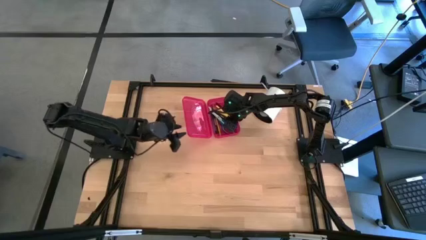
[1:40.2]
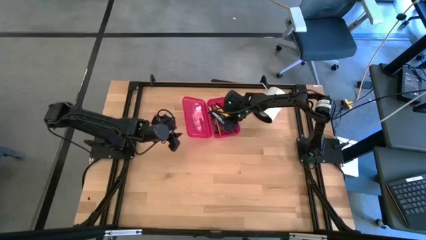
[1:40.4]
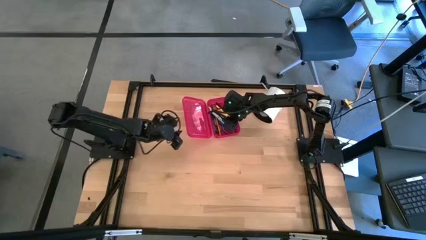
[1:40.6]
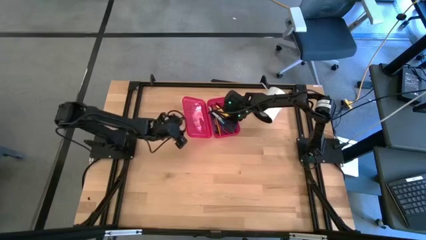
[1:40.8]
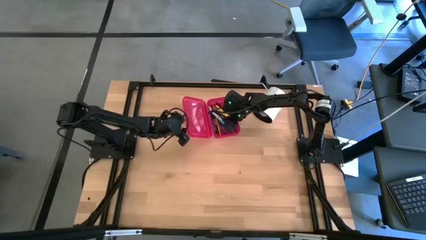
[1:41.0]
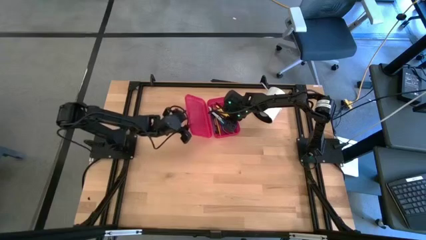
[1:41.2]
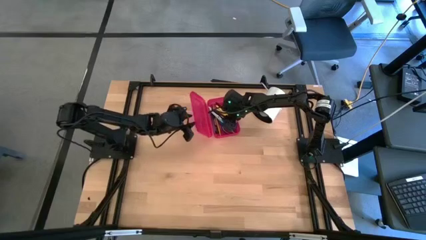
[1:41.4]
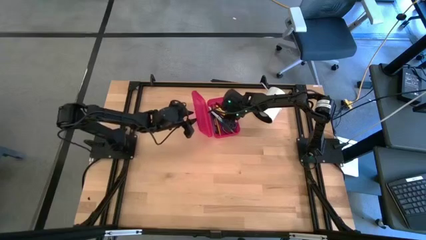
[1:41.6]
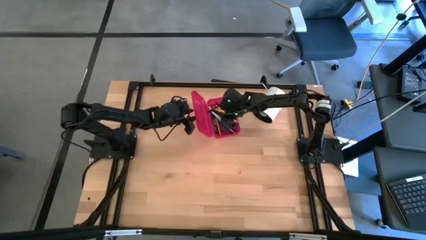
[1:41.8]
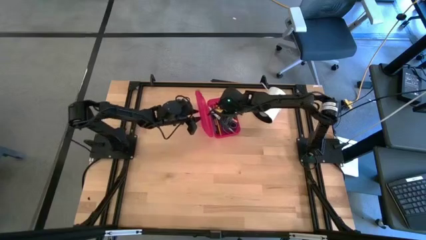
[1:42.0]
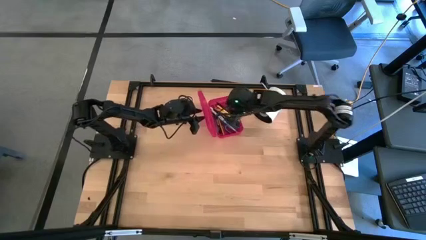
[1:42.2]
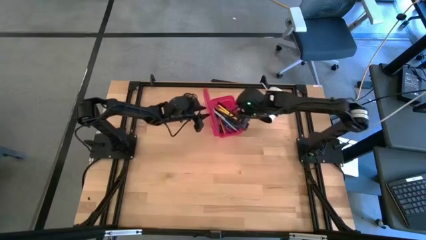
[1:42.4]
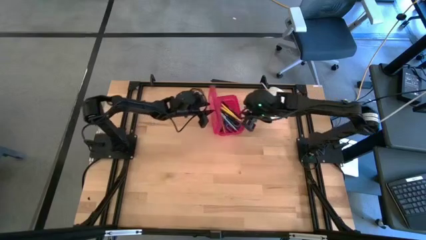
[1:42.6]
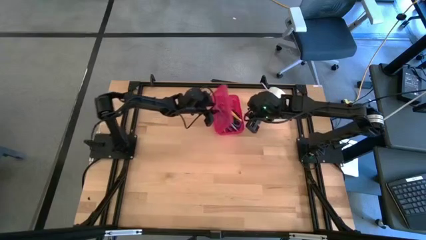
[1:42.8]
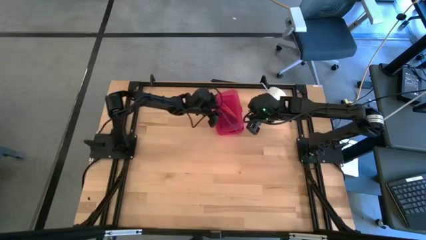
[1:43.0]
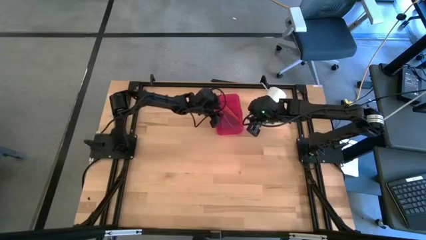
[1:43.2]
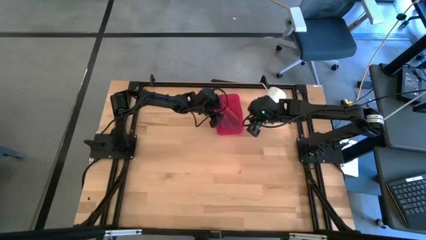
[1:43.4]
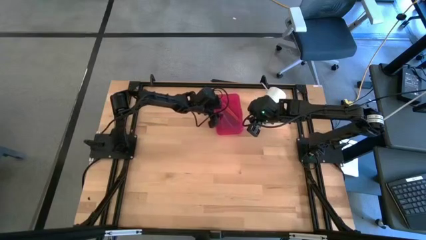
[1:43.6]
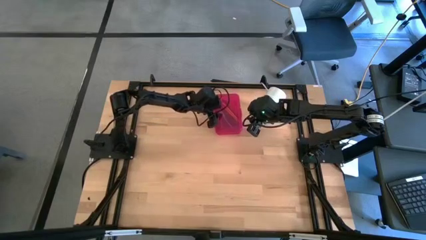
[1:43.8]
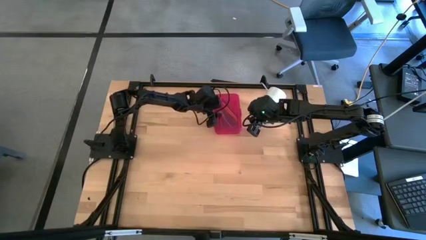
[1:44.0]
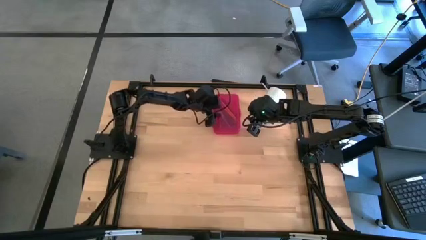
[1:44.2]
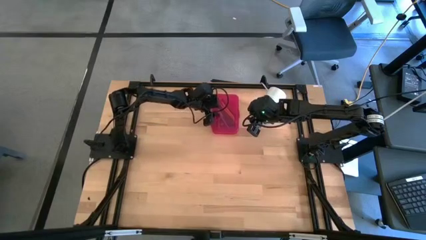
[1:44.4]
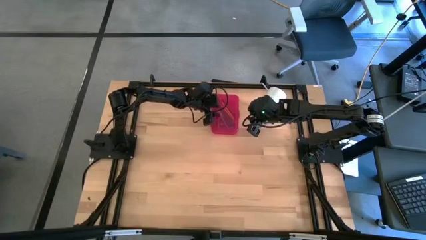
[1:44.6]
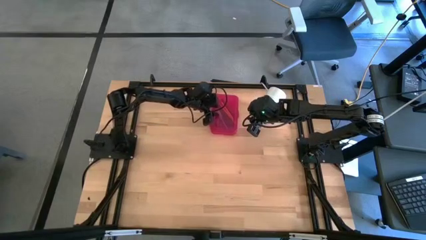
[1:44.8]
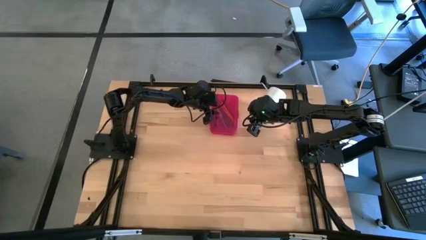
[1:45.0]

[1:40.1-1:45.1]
Task: Pick & place school supplies into a supply box
Close the red supply box

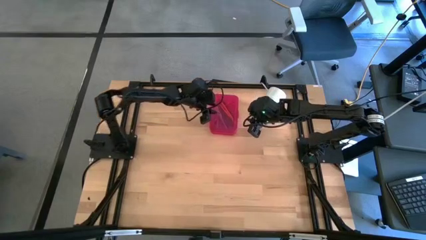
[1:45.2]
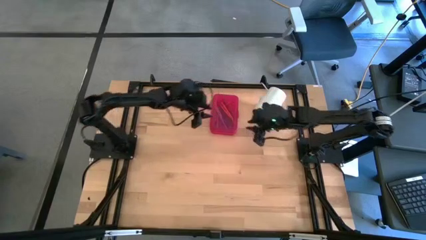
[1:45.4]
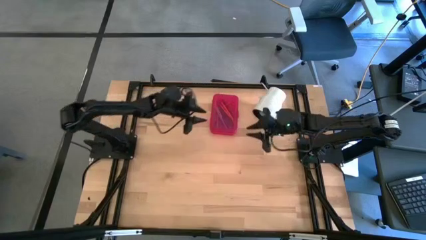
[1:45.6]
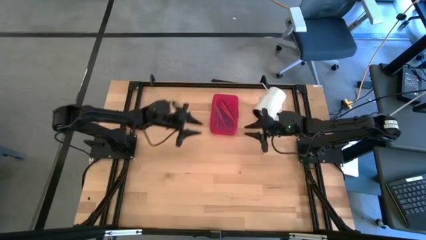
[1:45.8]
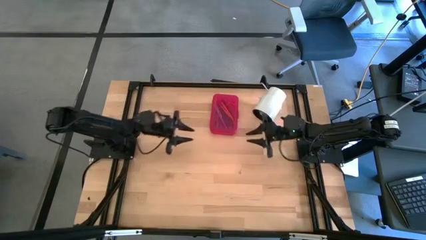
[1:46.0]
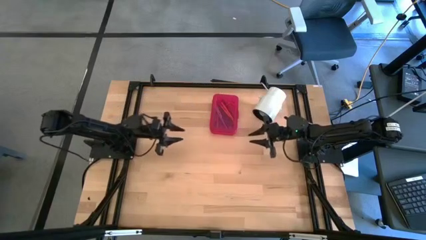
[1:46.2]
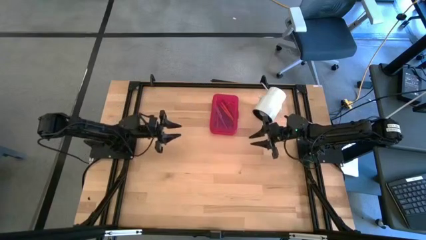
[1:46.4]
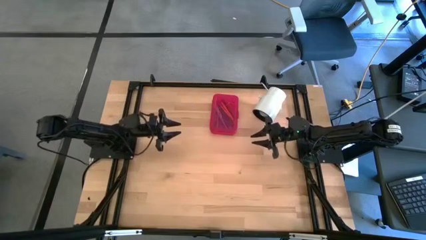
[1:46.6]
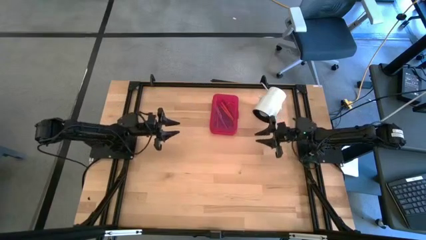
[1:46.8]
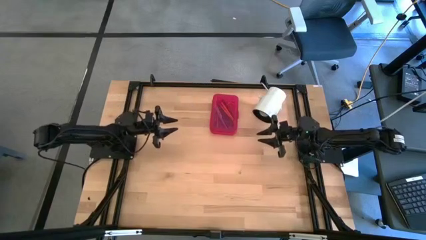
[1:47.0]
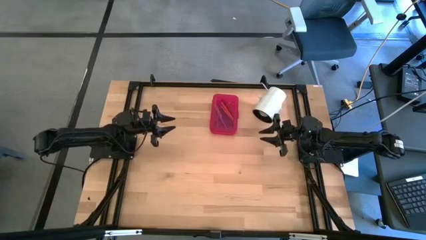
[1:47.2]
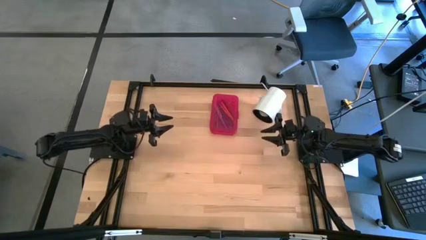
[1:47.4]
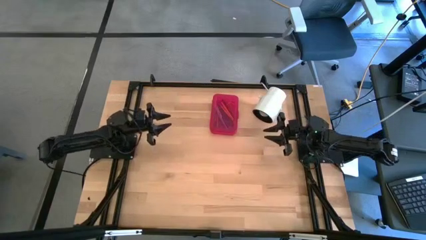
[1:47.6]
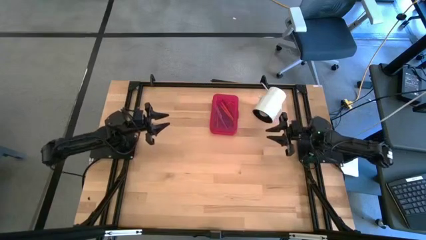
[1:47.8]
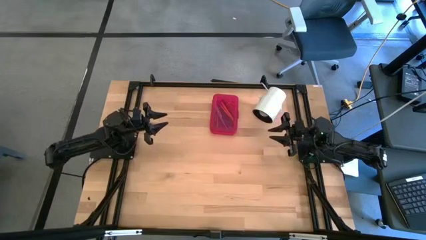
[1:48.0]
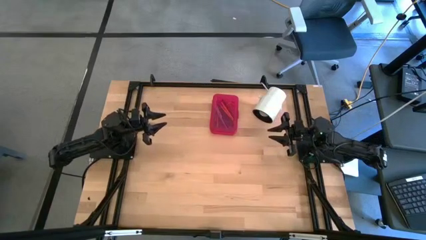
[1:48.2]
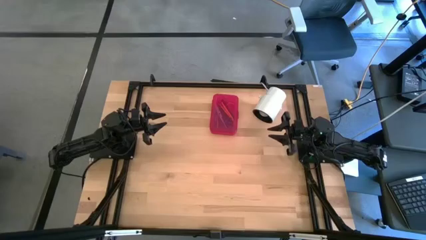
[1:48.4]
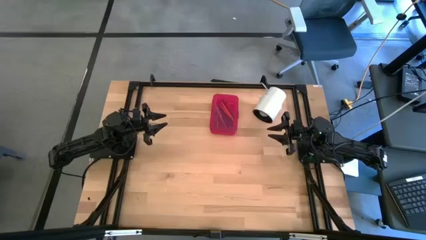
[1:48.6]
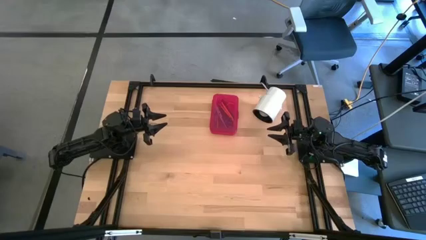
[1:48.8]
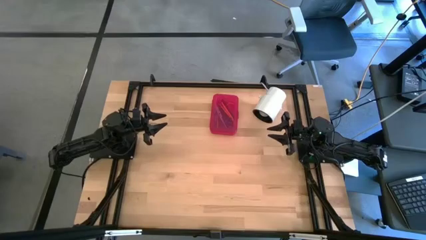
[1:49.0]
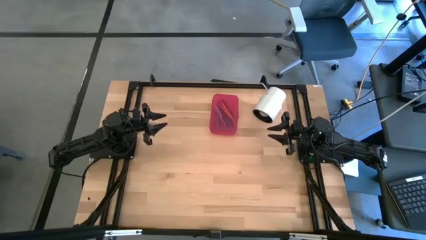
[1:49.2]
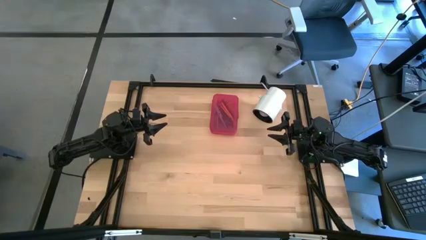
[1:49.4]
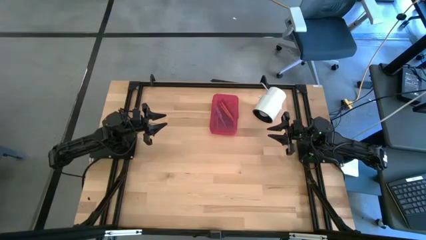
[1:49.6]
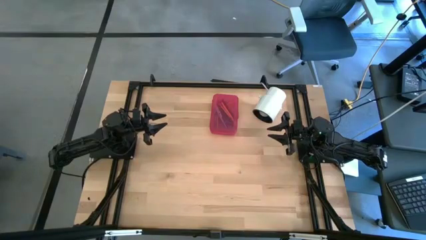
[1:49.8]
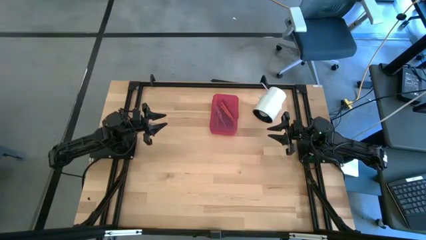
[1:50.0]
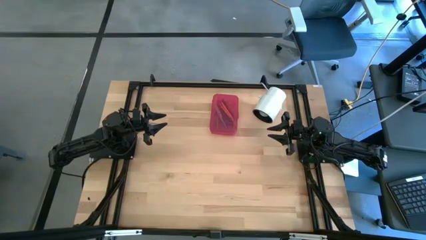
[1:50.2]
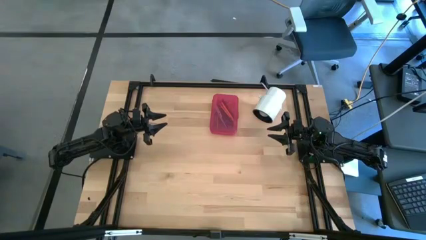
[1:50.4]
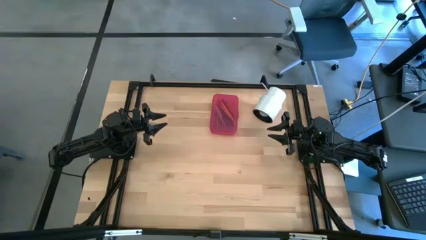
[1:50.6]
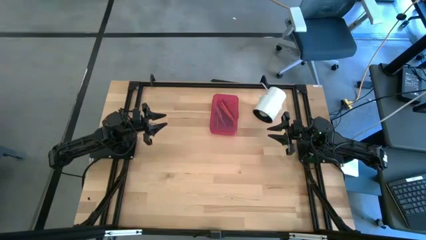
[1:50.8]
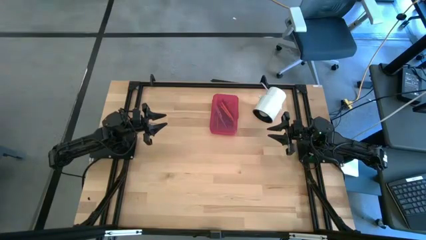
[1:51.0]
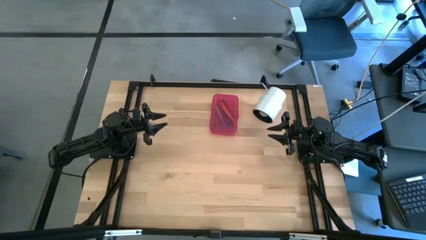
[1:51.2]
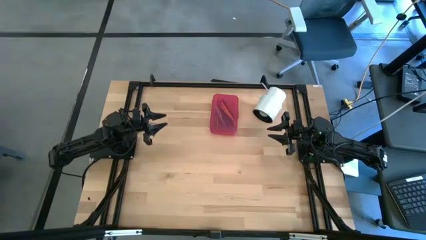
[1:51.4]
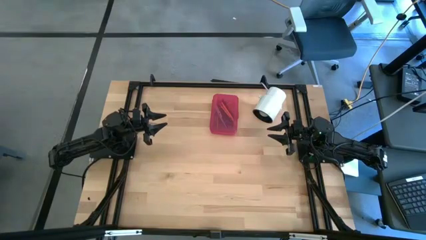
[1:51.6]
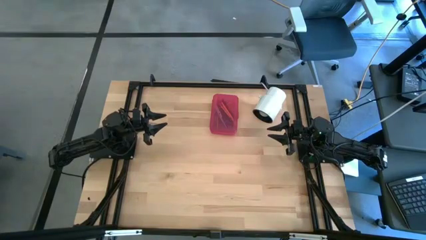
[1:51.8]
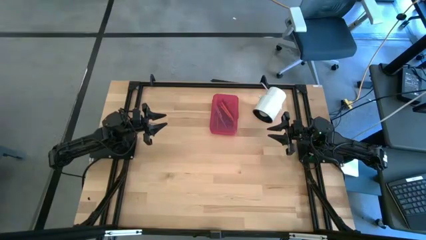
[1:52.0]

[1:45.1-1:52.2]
Return to Home Position

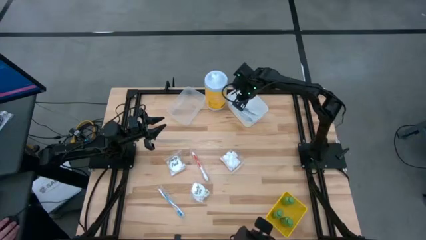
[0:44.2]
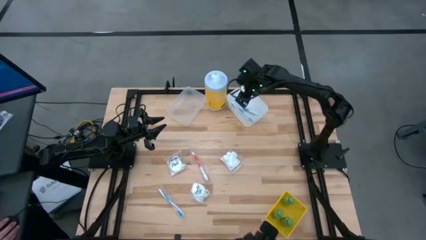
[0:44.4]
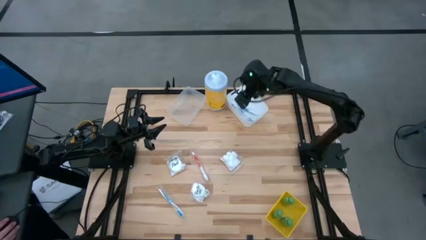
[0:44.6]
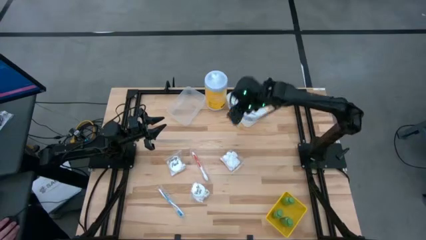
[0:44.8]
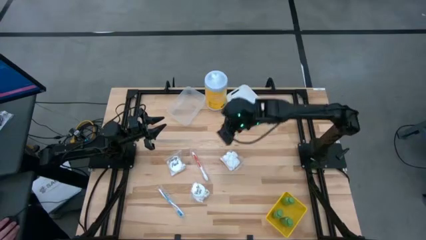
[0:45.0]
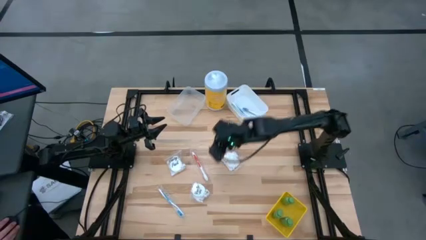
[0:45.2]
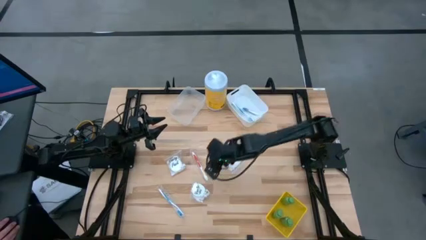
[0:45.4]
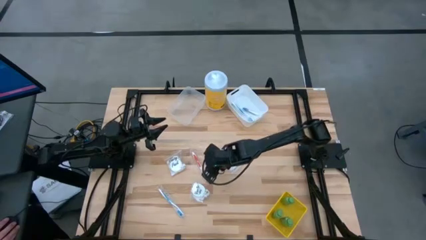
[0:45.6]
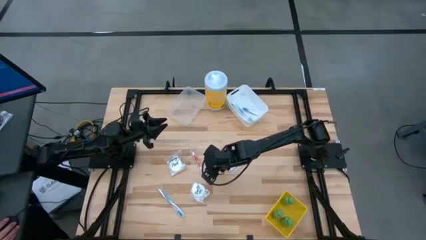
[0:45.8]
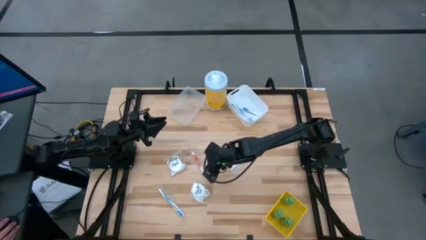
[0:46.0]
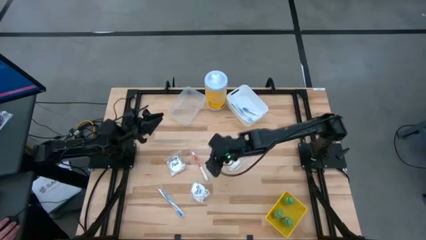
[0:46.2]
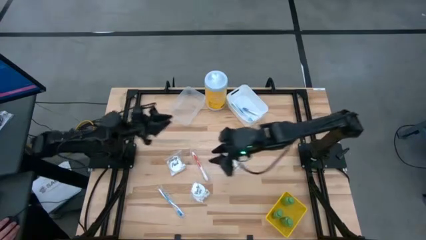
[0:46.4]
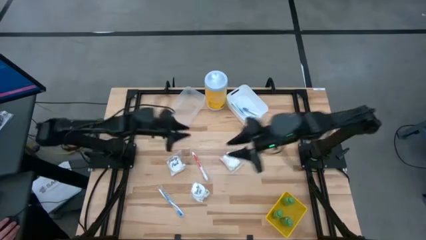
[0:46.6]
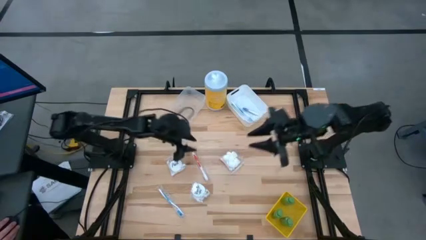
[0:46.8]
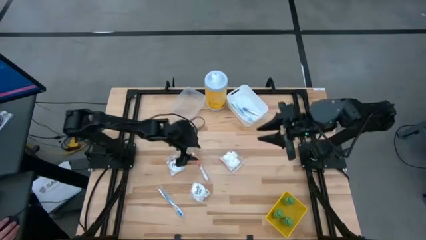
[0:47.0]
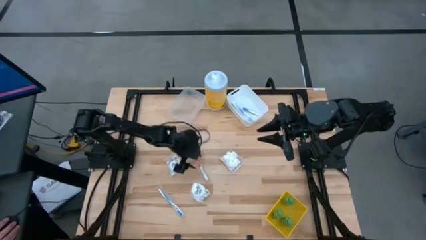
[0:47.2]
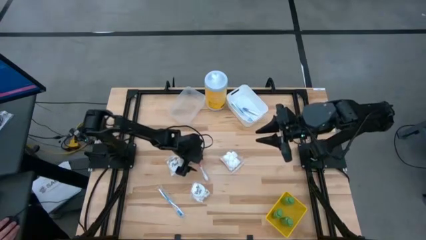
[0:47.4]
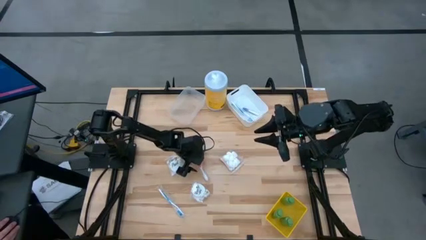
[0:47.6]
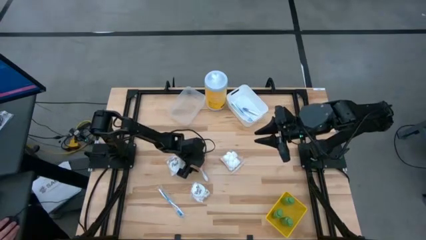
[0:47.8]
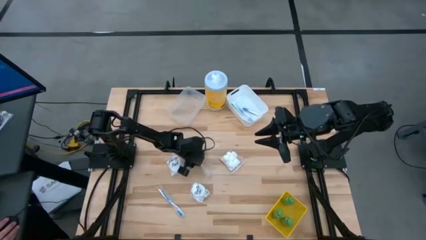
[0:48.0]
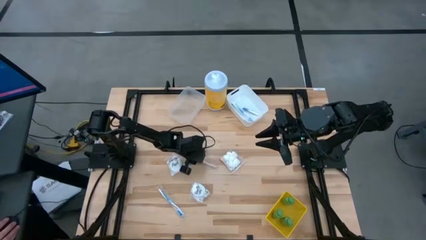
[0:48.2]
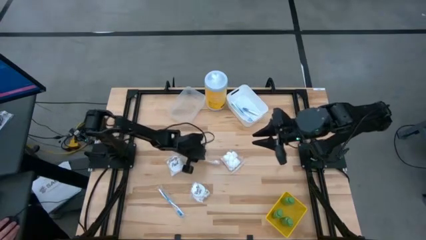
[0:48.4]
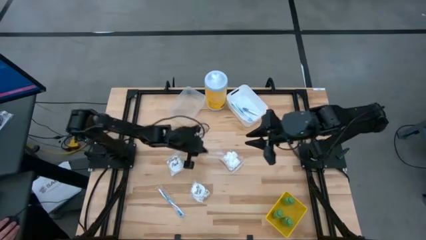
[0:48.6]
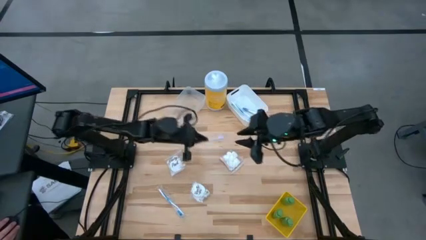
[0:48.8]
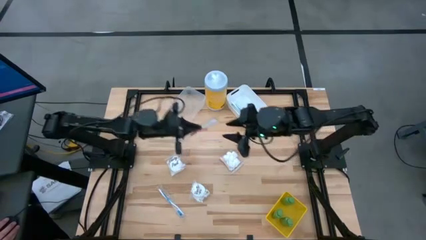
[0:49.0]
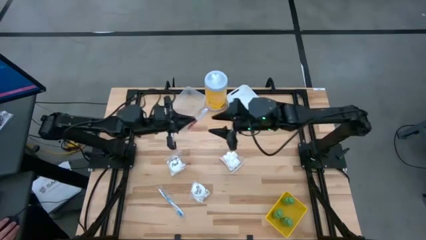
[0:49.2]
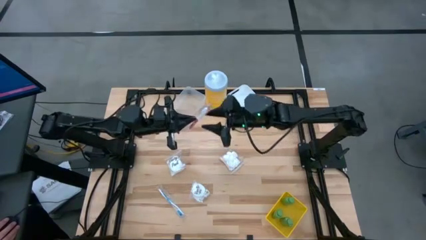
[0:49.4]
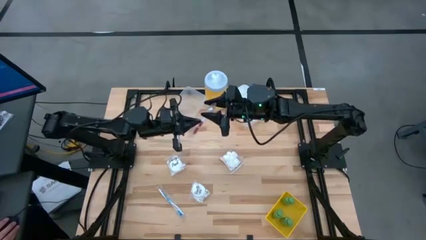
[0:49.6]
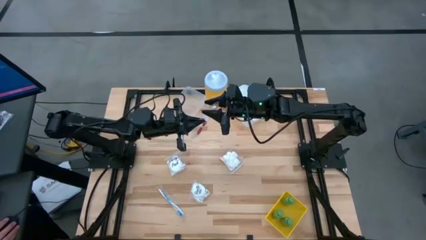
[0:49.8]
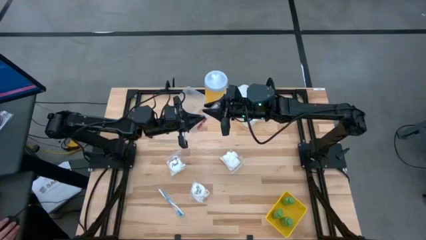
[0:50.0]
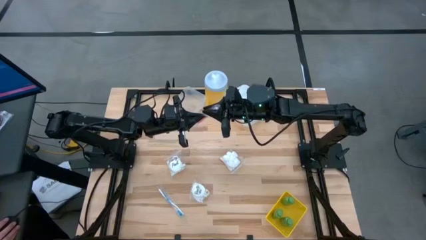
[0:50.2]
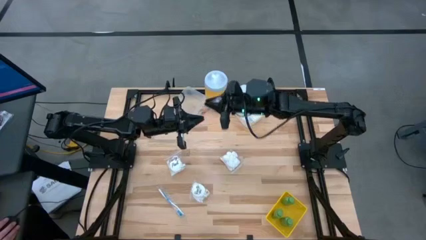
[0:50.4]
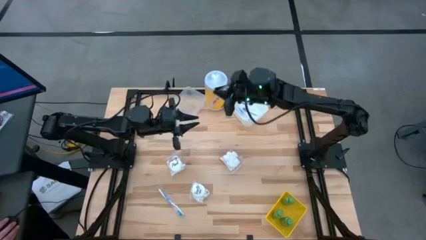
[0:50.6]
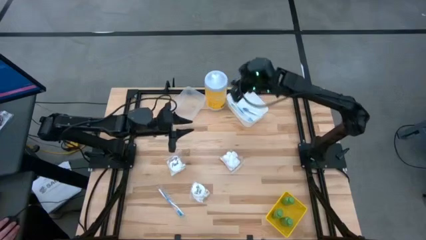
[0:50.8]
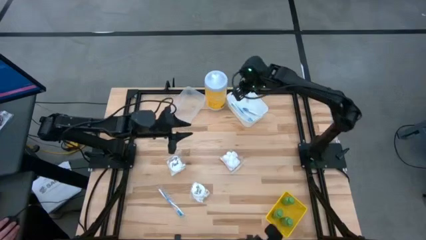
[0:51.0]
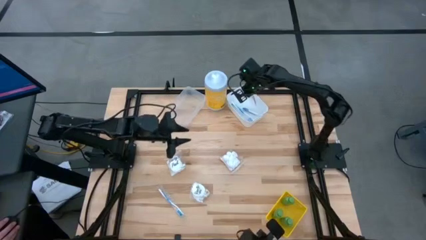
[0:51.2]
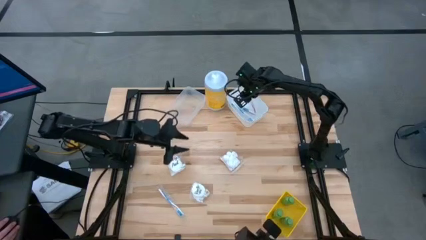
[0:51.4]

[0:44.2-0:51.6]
Task: Pick & Place Travel size toiletries
Put the orange toothbrush into the white bin
